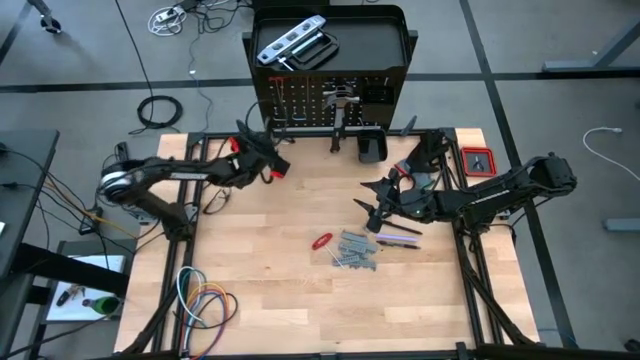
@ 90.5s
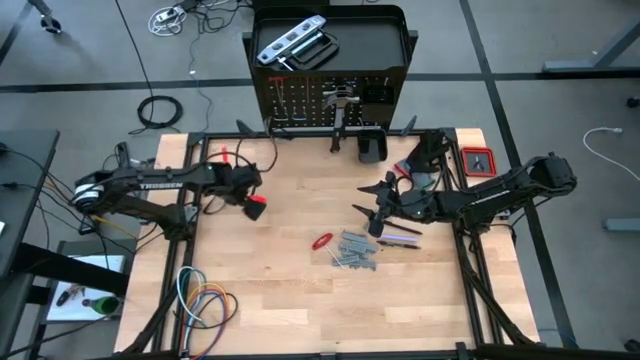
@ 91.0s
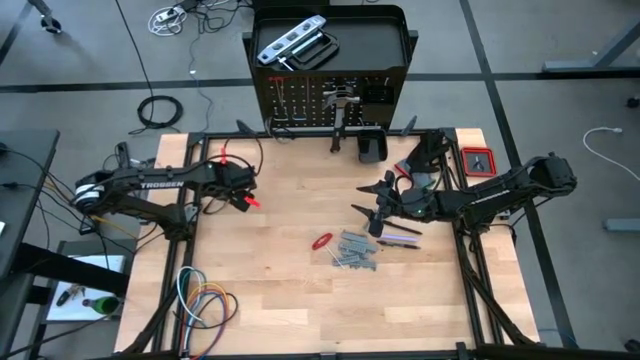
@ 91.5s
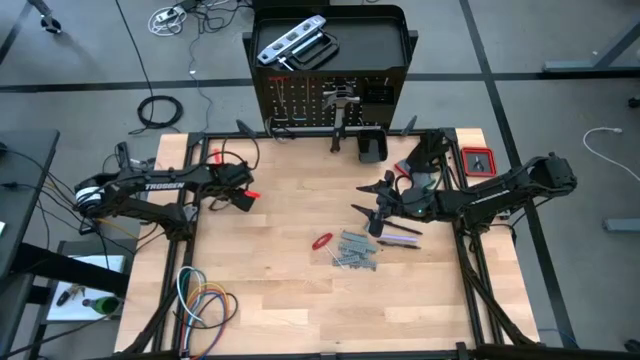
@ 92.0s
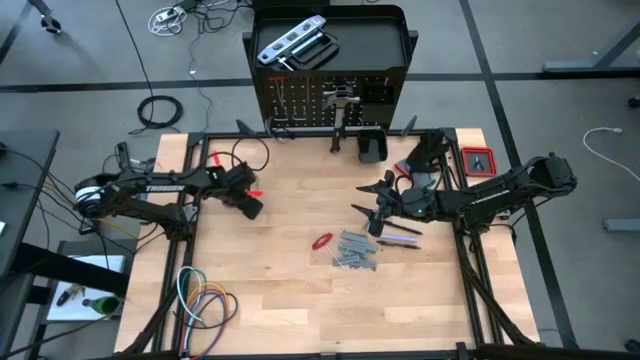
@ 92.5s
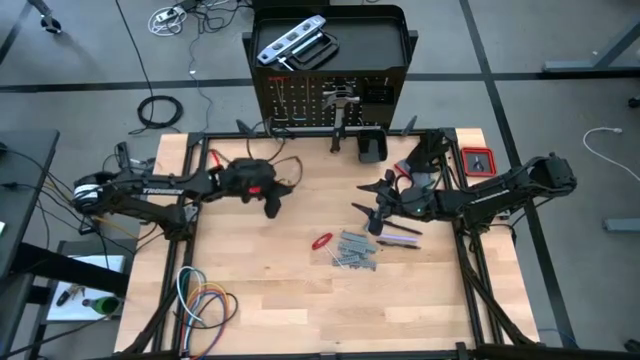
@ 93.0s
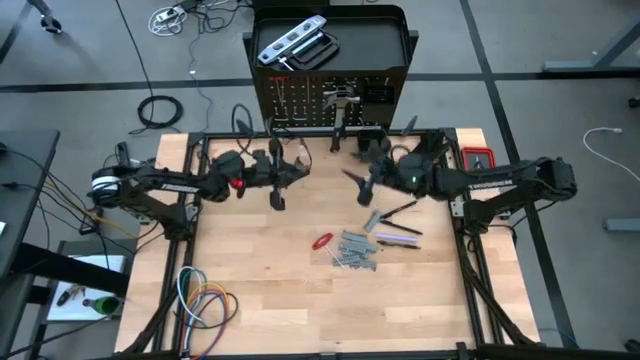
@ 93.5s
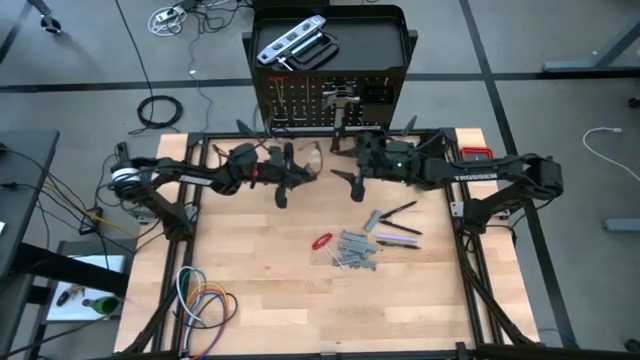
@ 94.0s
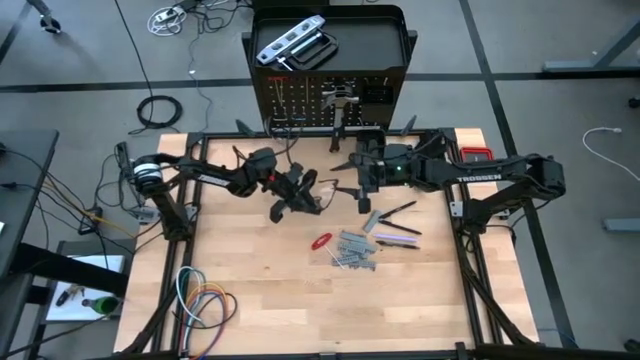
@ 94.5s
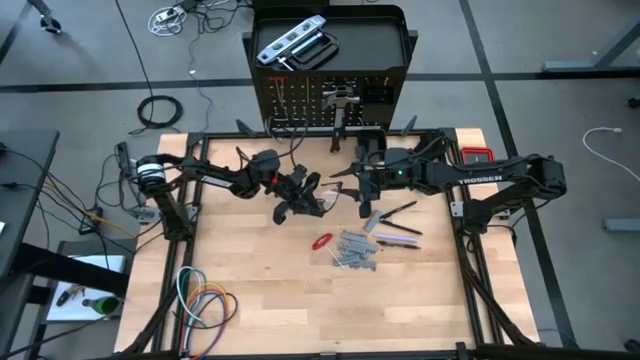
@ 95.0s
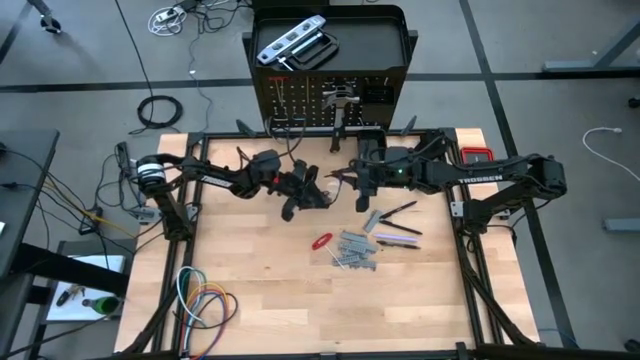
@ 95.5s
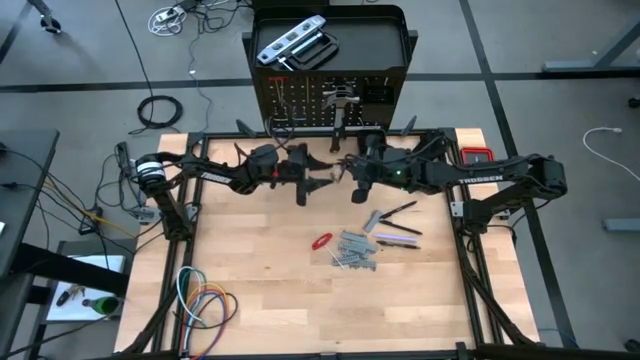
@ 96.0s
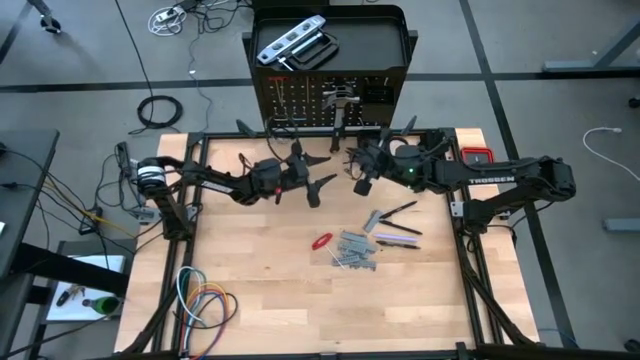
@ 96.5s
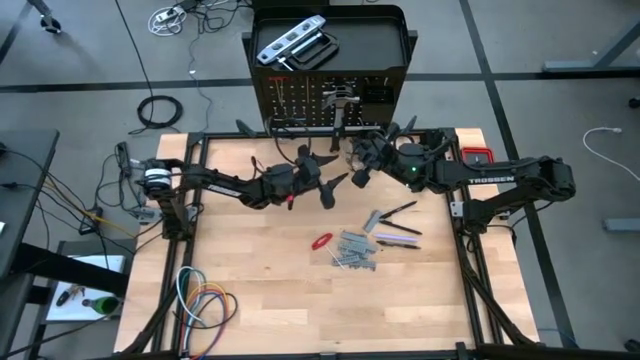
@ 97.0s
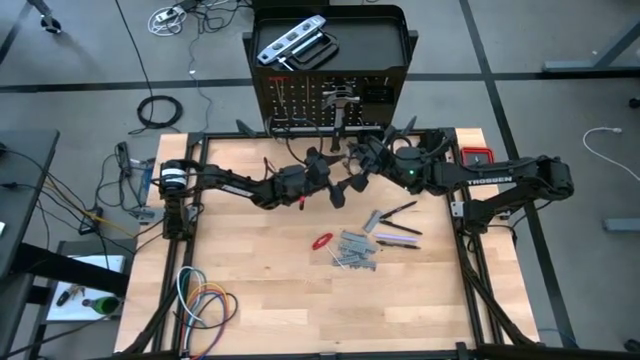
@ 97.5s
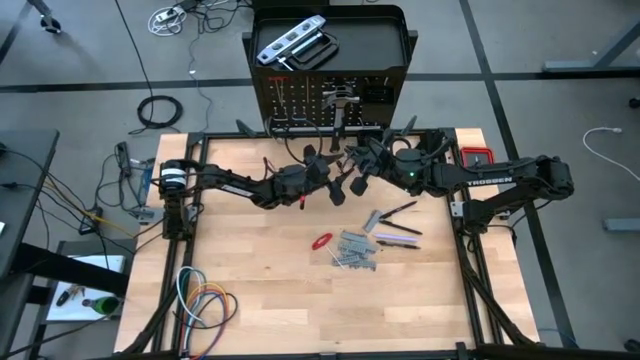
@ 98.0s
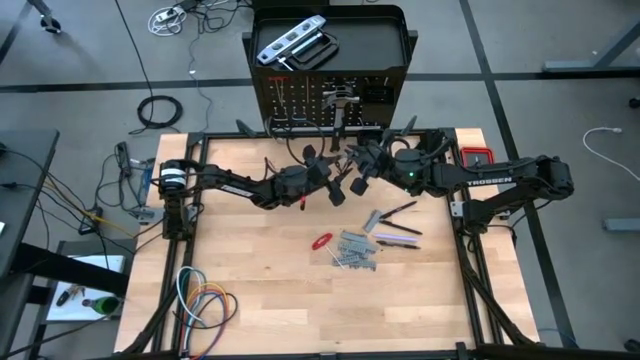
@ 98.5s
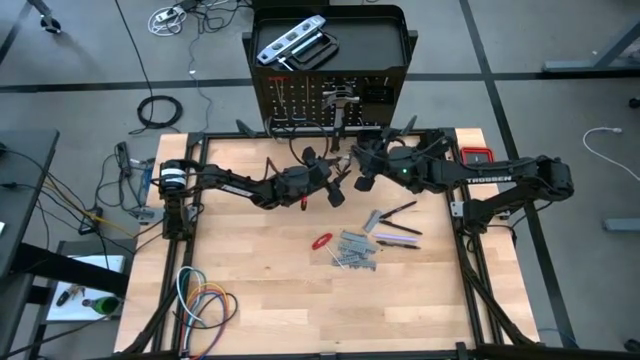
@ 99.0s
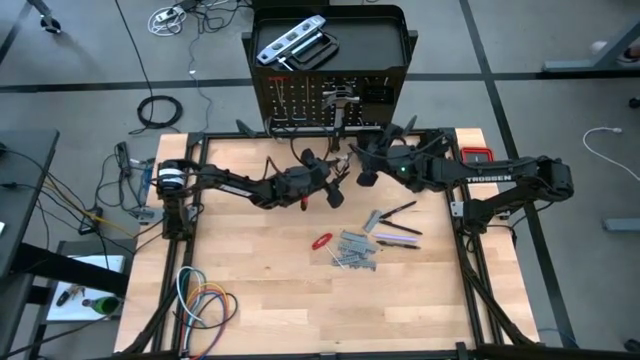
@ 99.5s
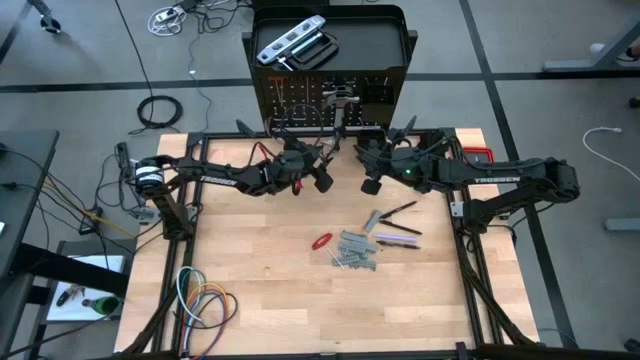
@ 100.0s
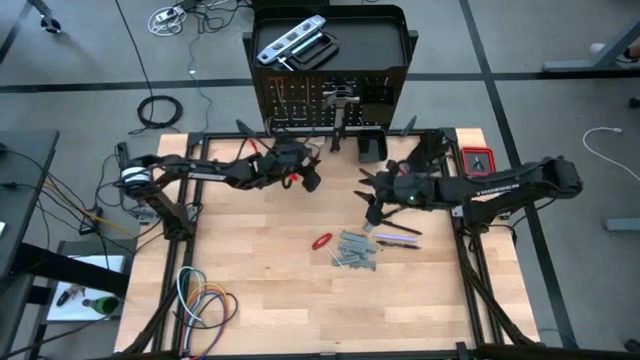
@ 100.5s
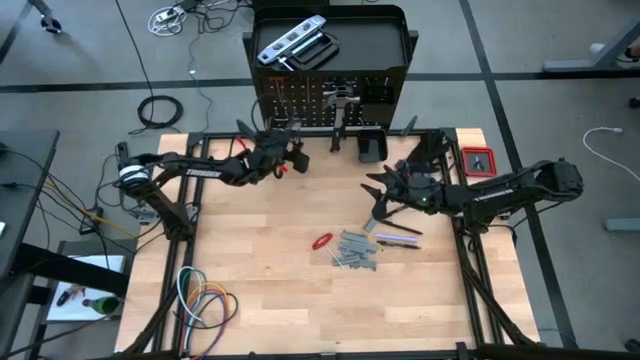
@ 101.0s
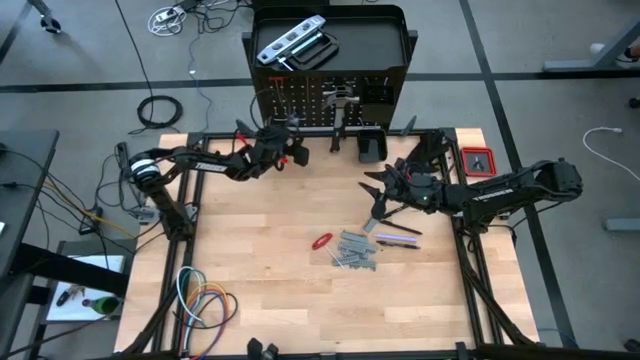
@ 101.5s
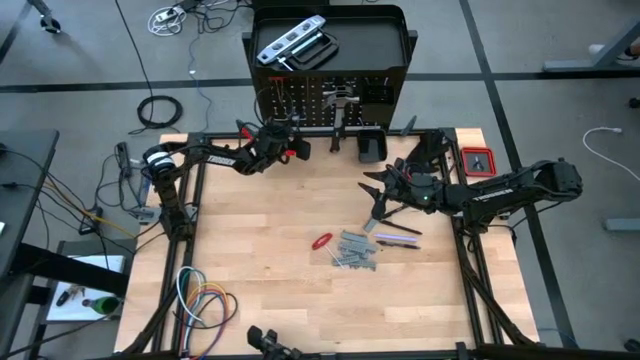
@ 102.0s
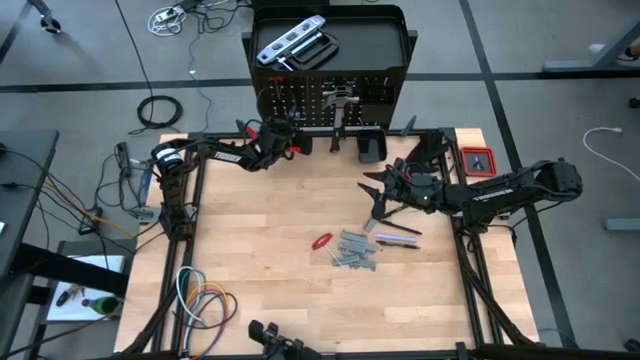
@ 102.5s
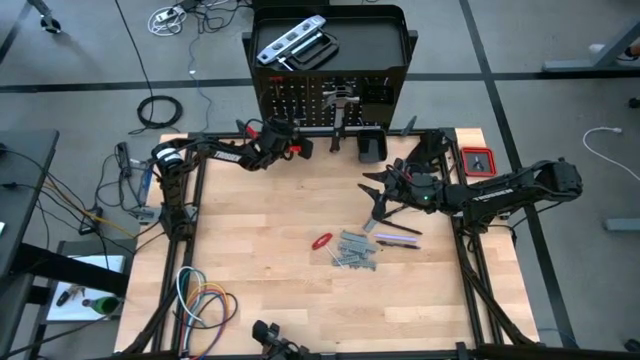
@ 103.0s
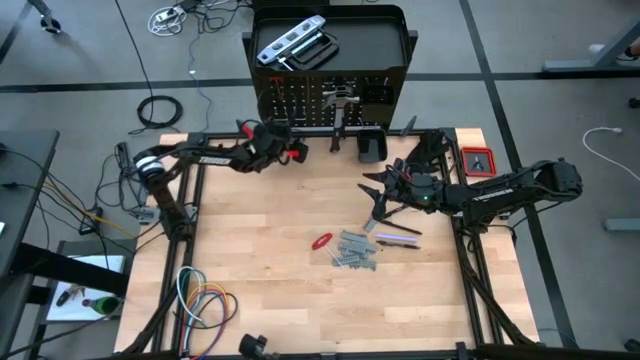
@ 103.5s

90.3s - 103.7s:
Task: Hang tools onto peg board
Hang the glasses onto the peg board

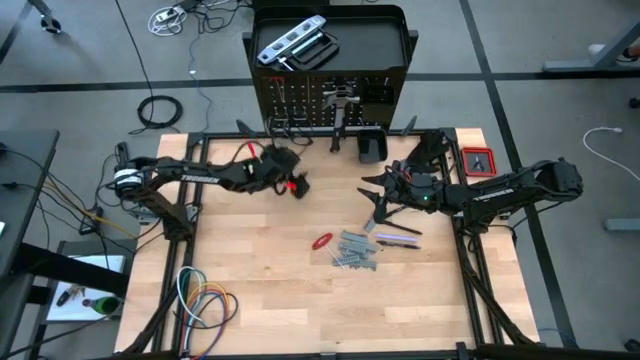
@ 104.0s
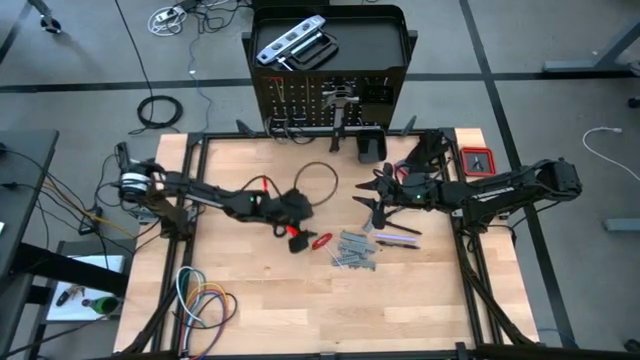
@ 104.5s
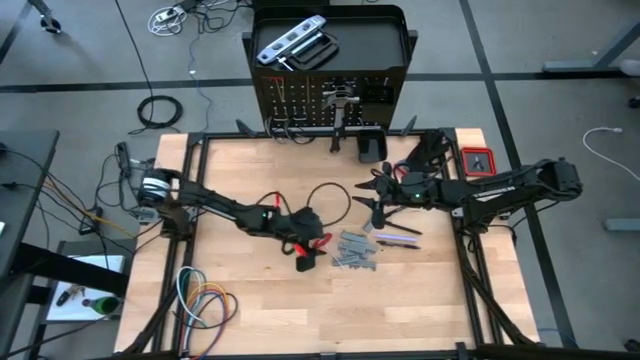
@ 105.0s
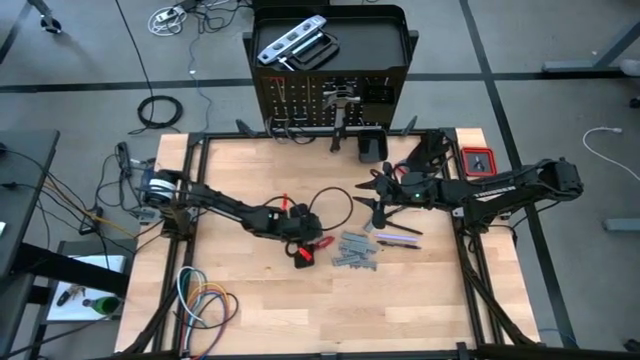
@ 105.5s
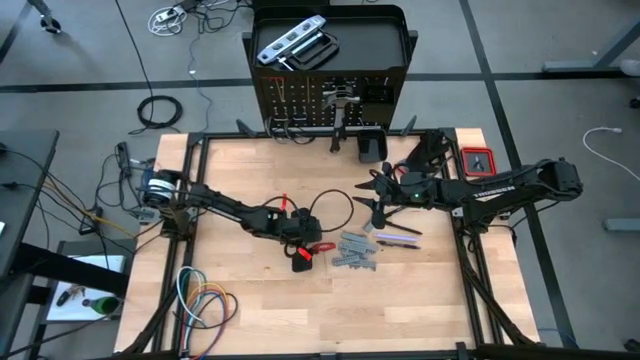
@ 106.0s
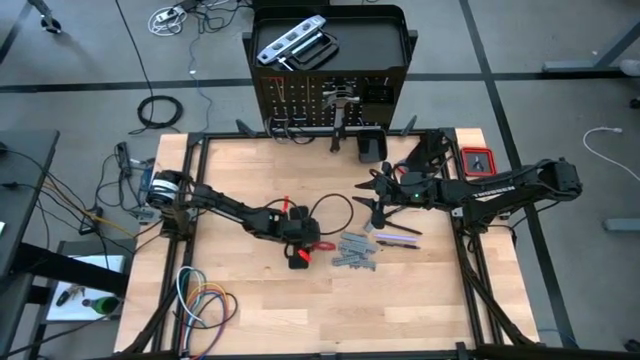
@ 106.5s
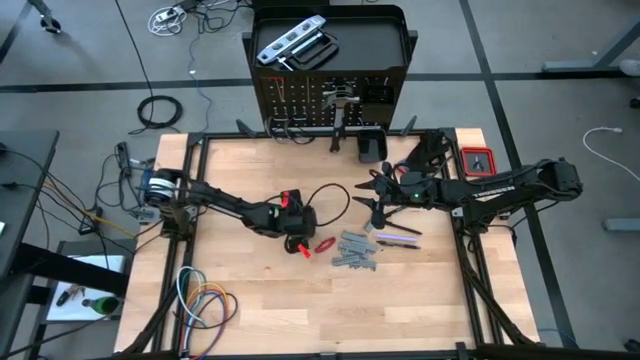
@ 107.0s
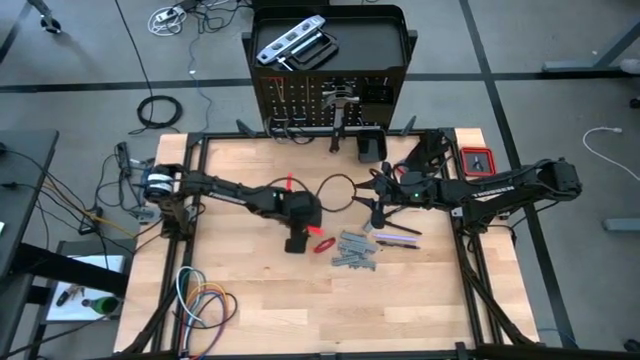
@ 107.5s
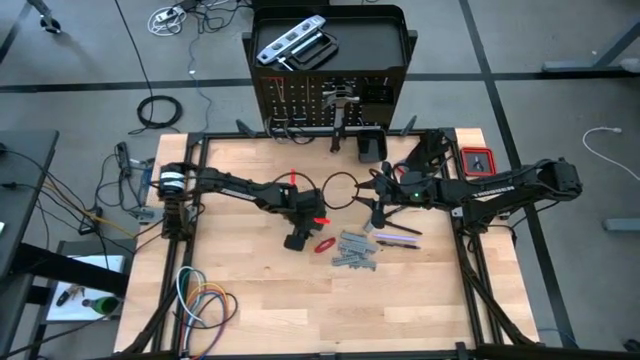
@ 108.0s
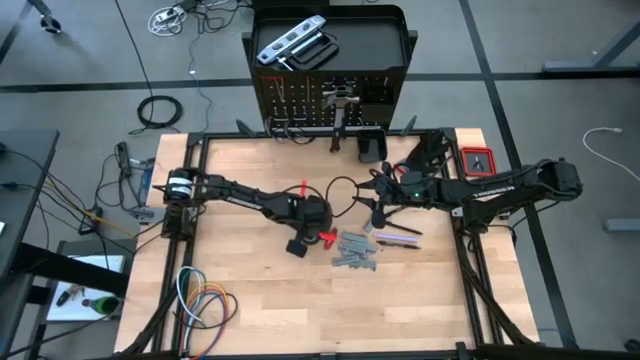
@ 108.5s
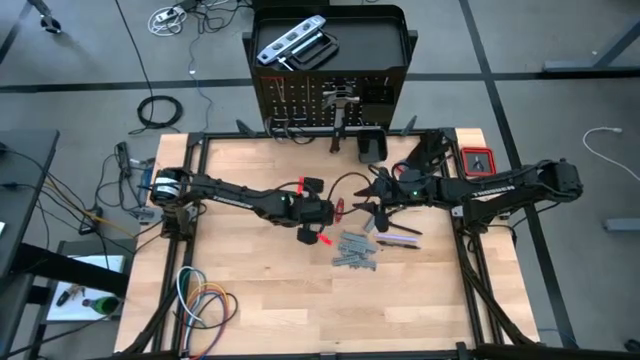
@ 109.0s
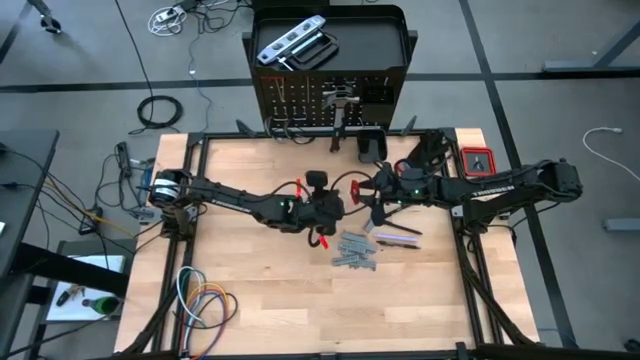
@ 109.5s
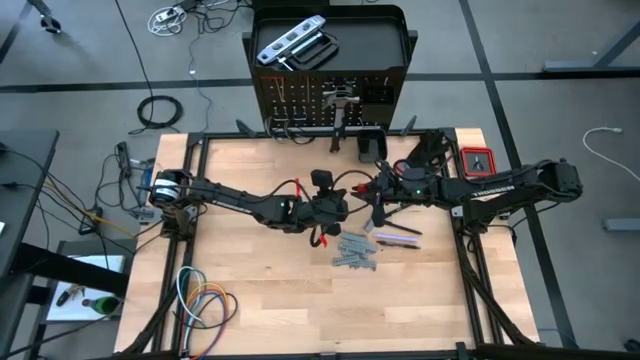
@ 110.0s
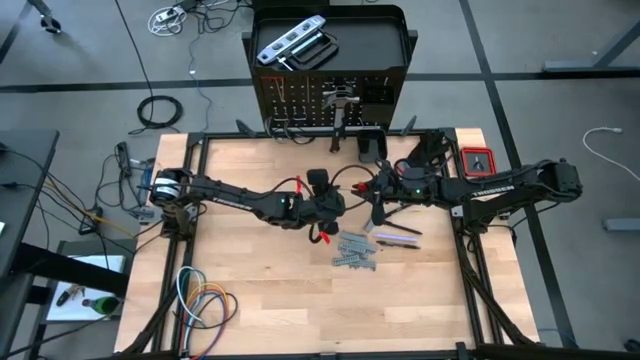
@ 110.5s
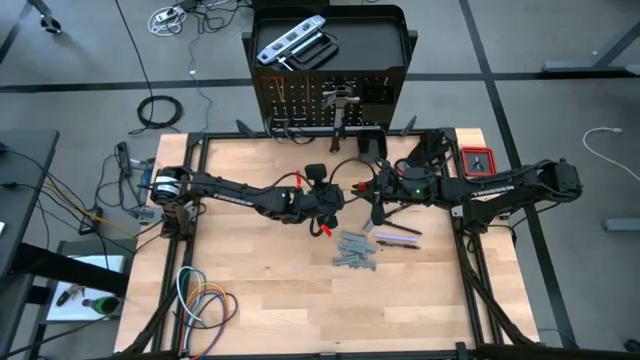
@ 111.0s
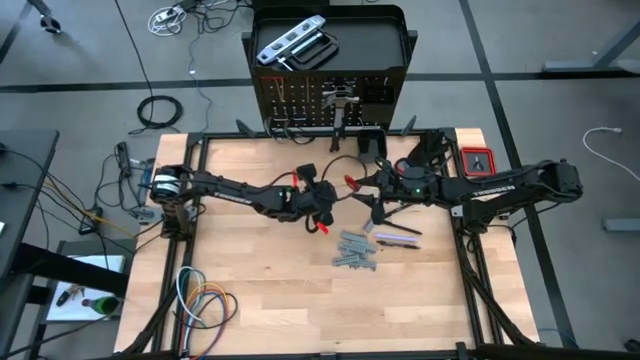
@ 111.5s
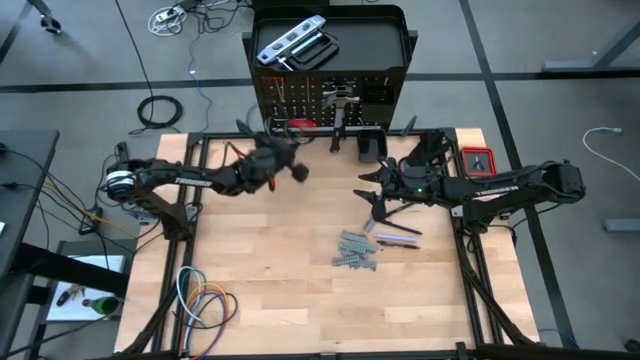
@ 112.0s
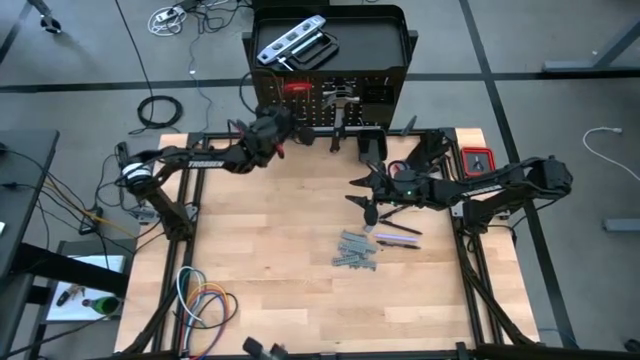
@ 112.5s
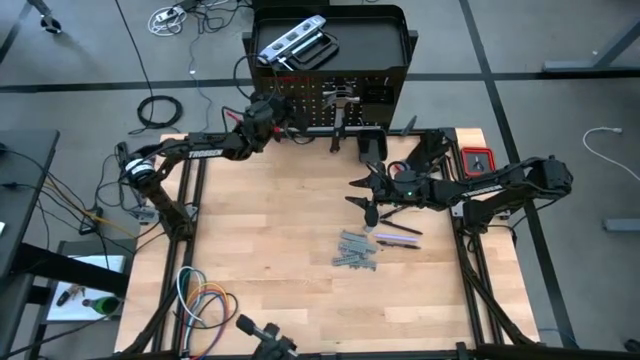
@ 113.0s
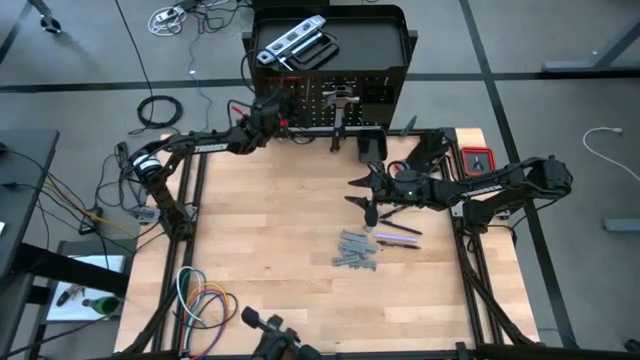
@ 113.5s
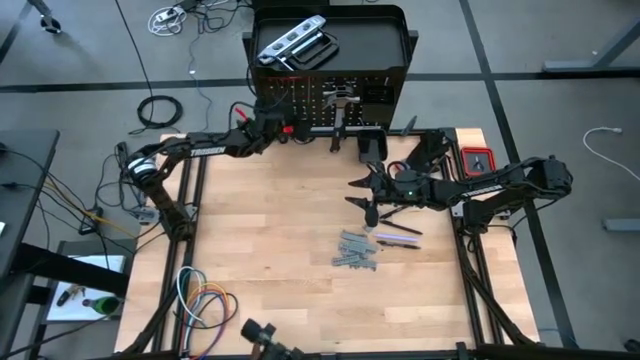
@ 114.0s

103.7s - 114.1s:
Hang the allen wrench onto the peg board
